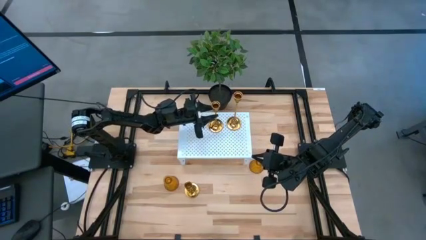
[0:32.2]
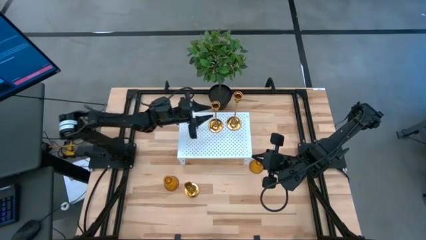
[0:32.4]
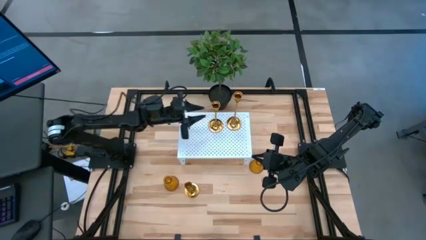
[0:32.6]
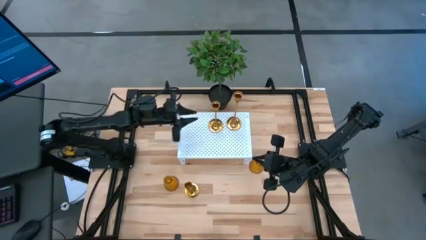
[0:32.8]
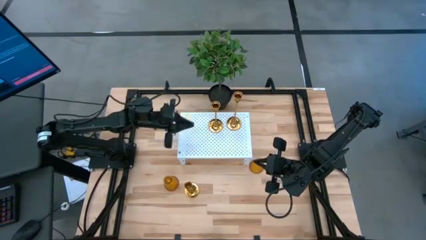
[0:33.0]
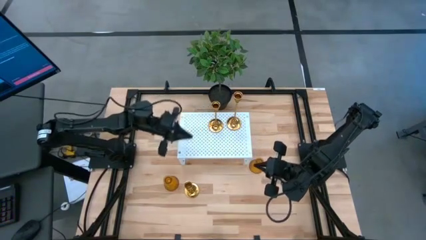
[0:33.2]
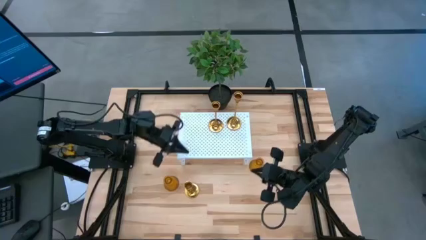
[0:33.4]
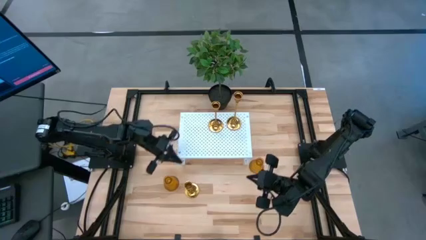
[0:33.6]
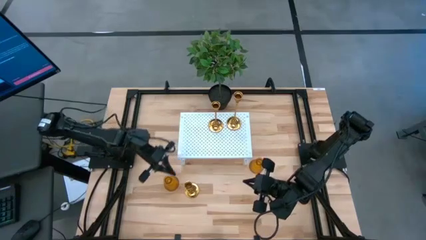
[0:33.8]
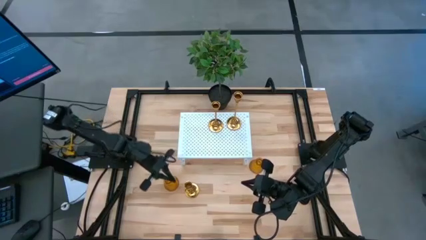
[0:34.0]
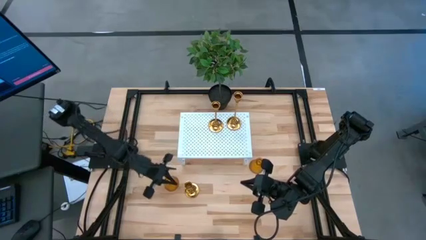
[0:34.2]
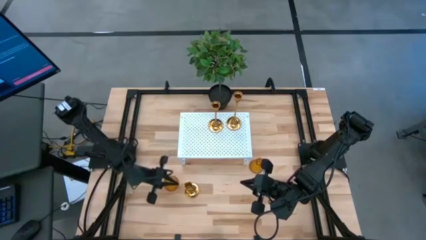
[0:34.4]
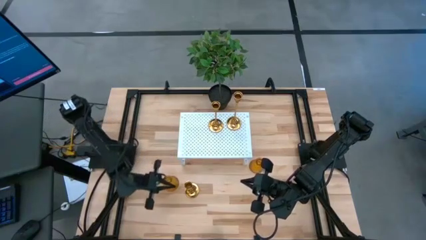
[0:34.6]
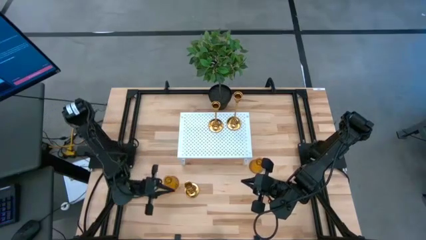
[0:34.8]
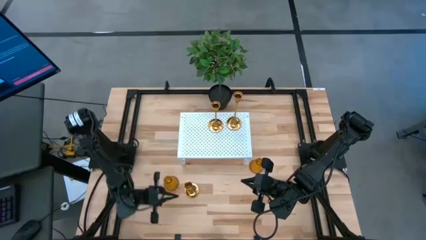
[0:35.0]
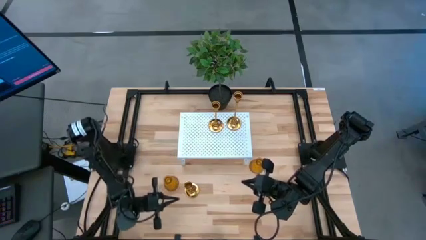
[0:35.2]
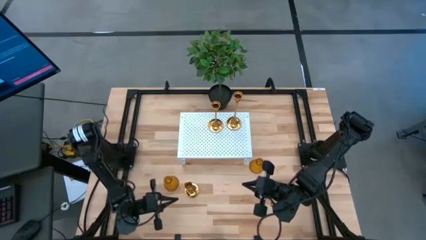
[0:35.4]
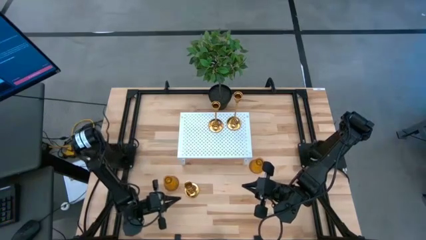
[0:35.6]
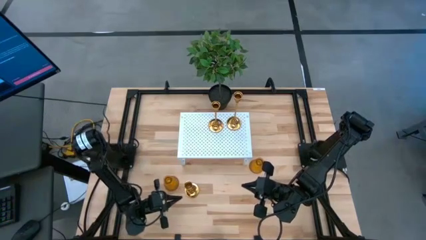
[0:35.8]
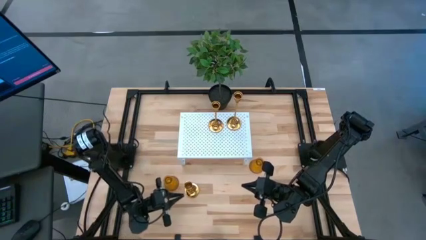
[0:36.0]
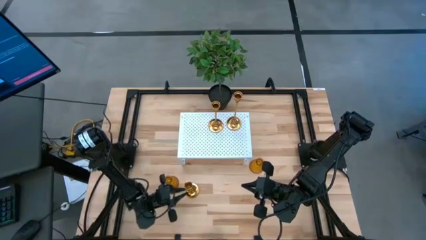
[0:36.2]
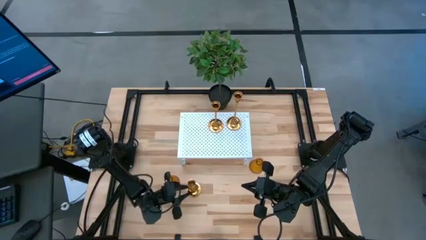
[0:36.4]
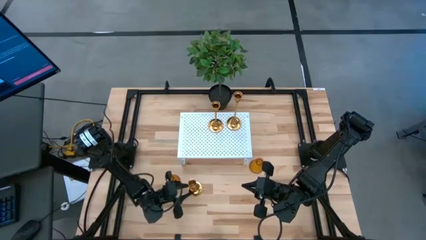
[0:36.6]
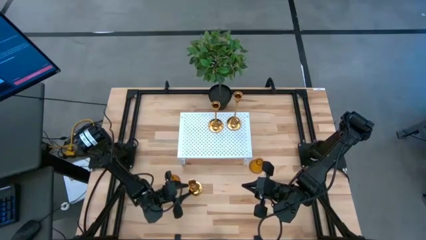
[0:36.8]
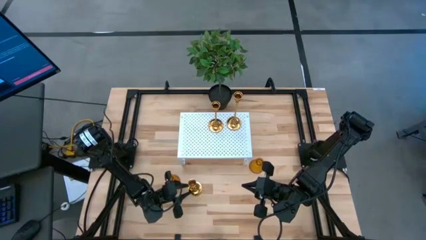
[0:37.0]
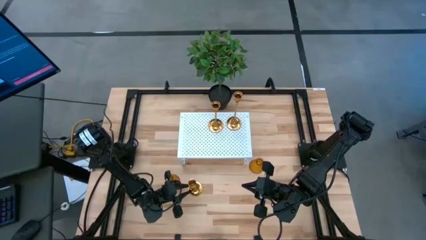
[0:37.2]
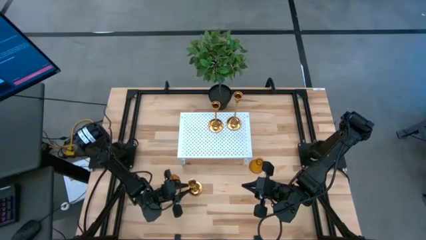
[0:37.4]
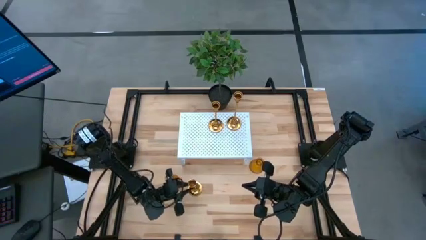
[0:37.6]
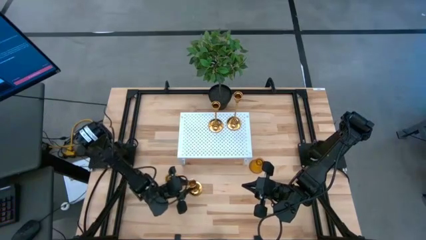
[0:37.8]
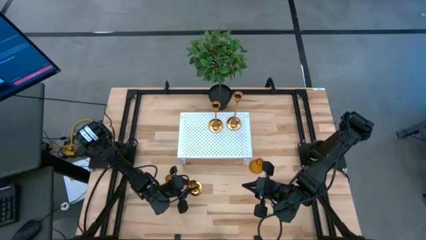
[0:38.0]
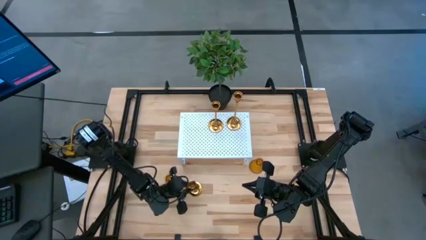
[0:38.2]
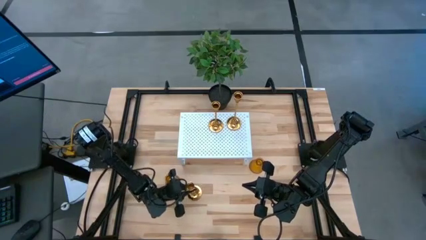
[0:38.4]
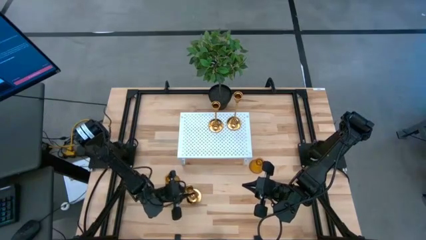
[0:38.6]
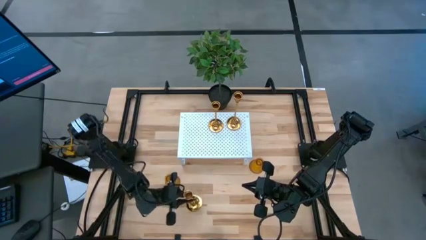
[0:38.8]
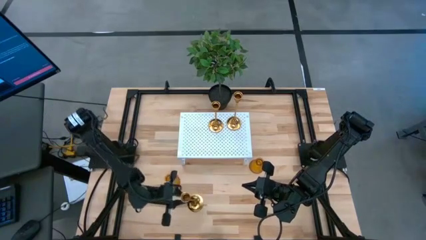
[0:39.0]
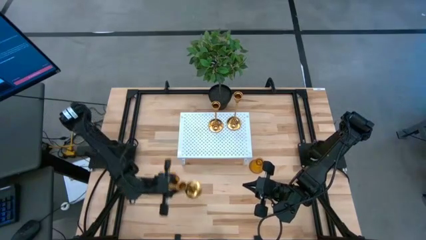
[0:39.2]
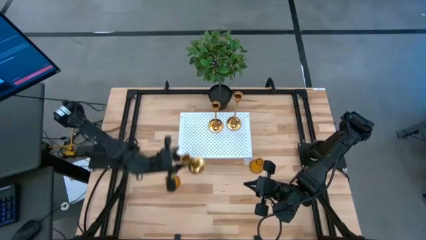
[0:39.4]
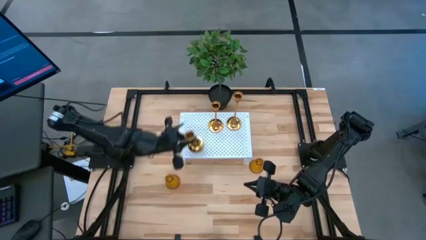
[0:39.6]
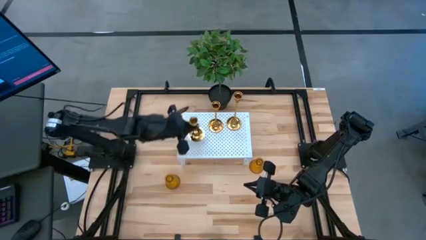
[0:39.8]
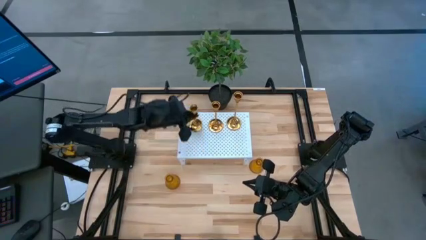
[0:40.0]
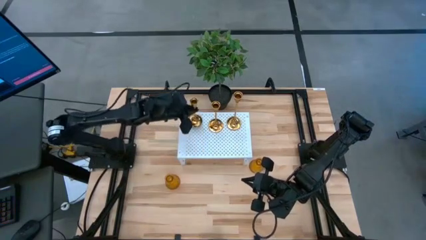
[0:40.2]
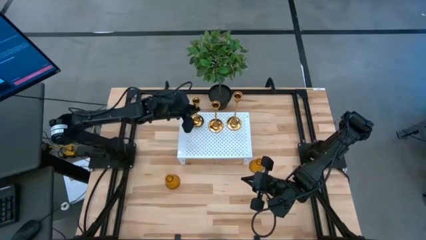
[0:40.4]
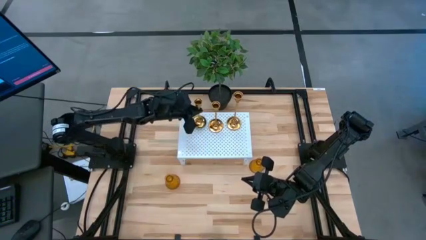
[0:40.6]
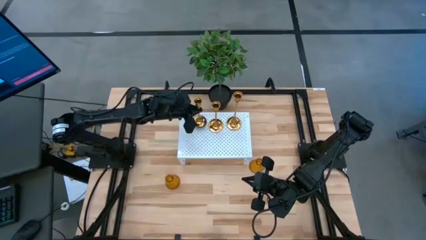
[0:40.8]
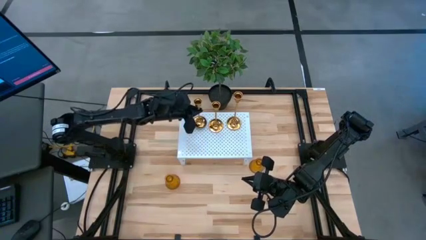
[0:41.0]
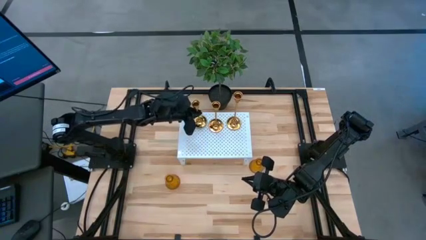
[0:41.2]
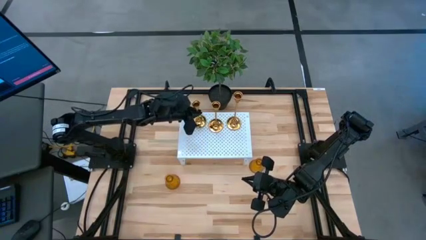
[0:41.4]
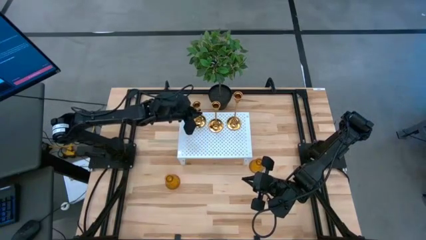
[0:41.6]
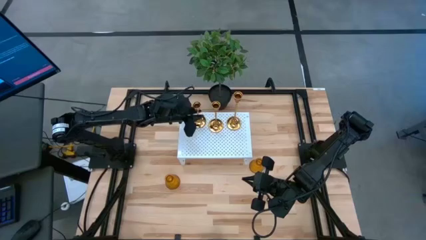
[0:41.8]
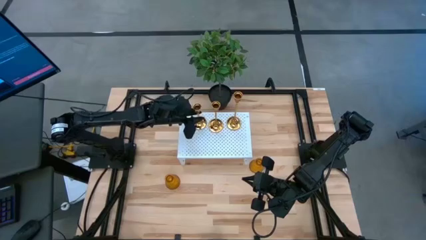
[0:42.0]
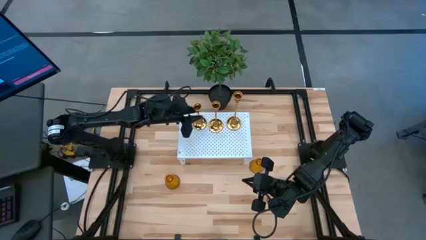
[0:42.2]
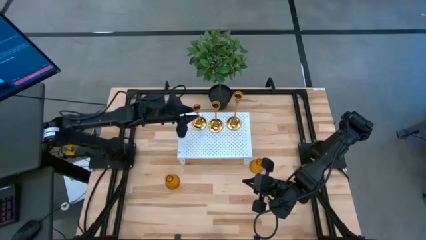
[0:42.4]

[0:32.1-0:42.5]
Task: Pick & Place candle stick holders
Put the gold candle holder on the shelf

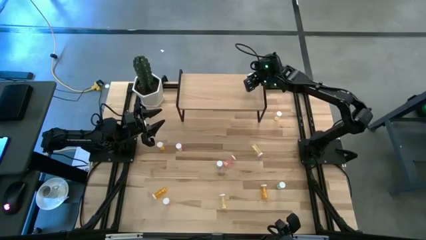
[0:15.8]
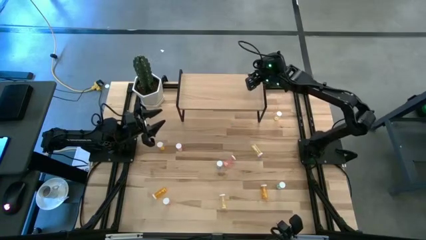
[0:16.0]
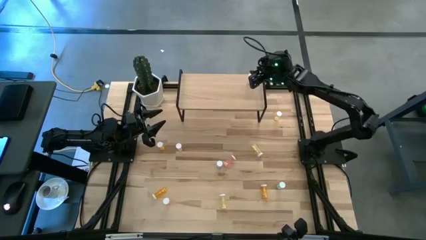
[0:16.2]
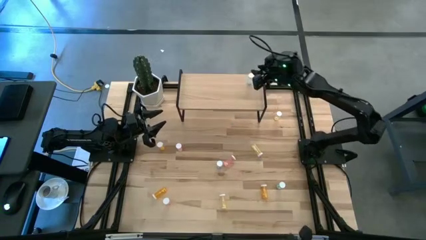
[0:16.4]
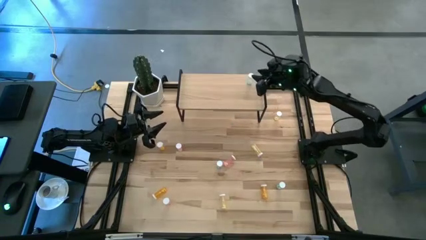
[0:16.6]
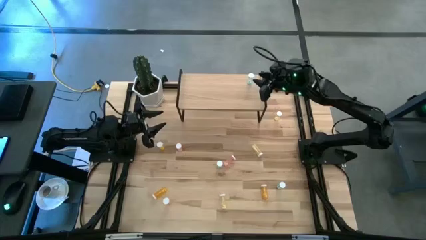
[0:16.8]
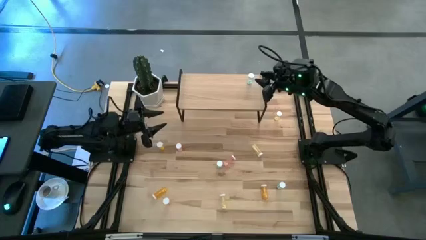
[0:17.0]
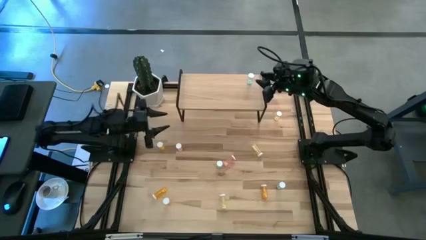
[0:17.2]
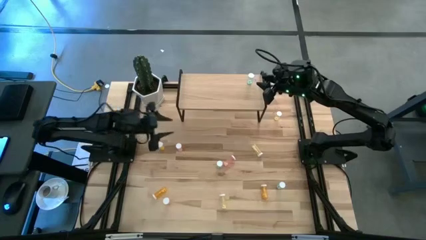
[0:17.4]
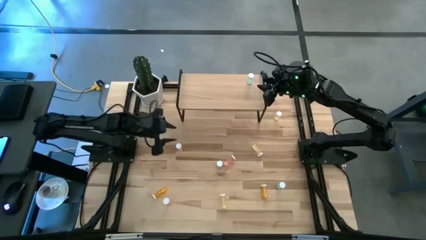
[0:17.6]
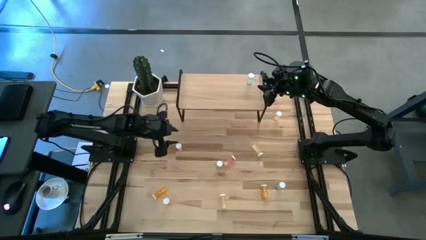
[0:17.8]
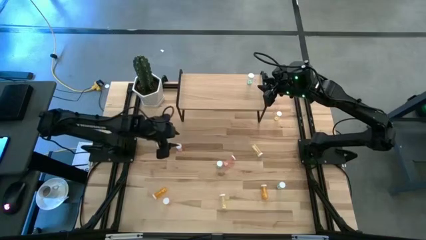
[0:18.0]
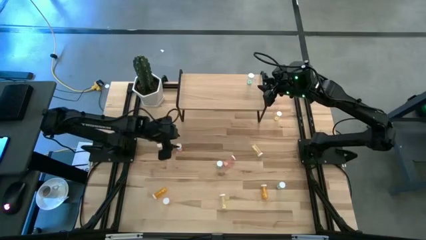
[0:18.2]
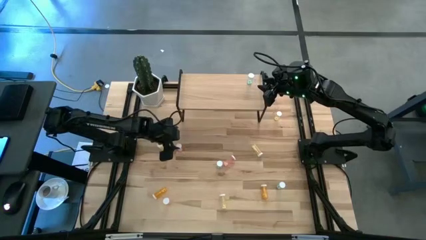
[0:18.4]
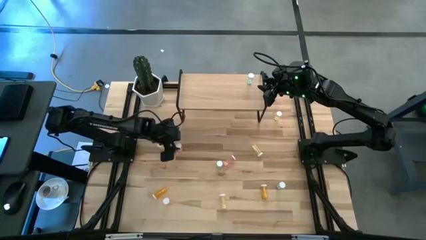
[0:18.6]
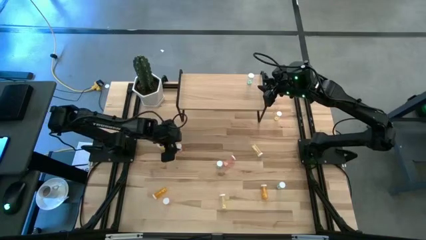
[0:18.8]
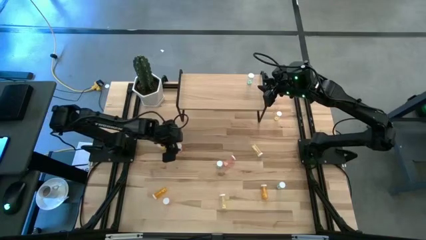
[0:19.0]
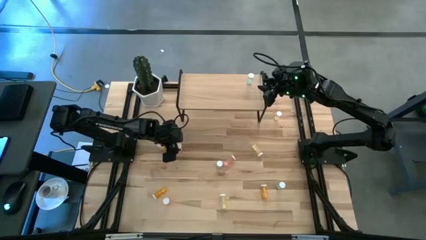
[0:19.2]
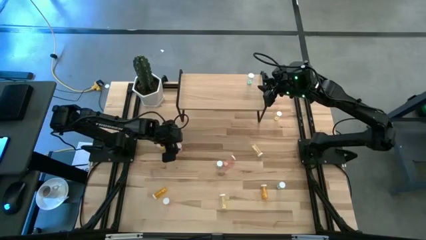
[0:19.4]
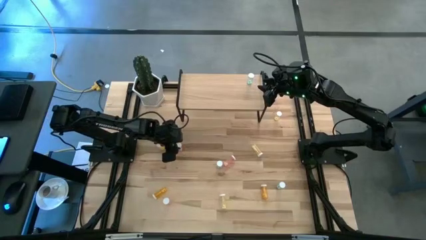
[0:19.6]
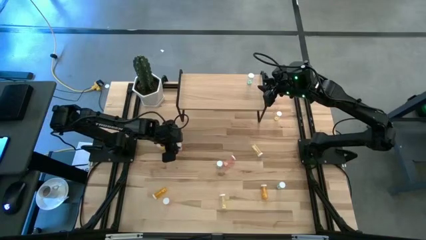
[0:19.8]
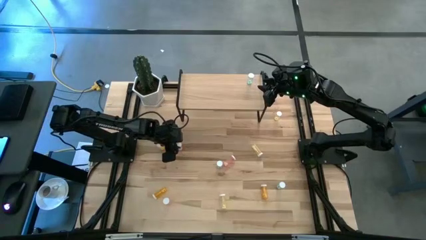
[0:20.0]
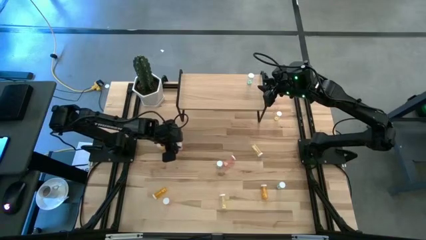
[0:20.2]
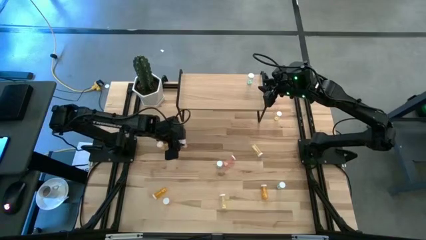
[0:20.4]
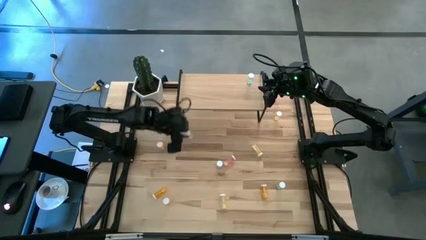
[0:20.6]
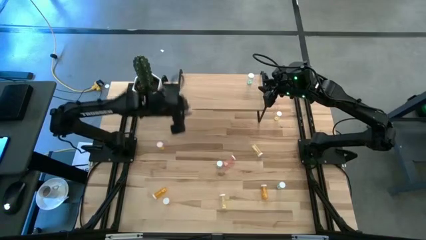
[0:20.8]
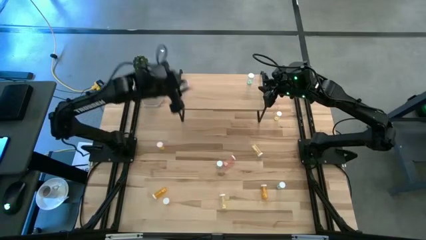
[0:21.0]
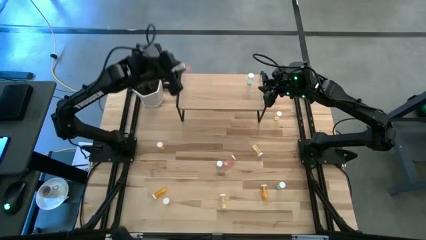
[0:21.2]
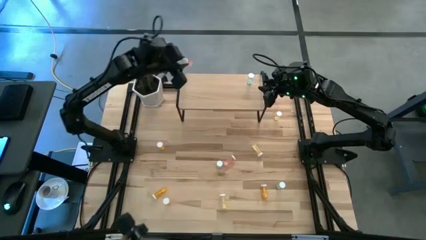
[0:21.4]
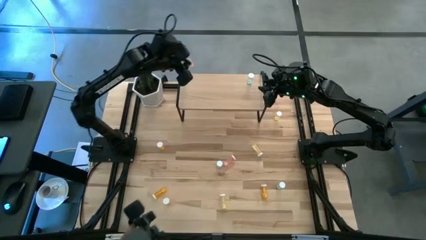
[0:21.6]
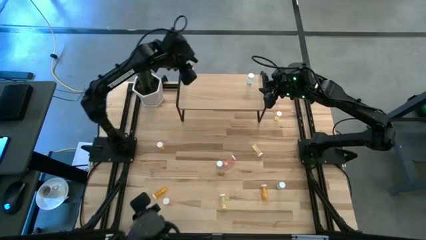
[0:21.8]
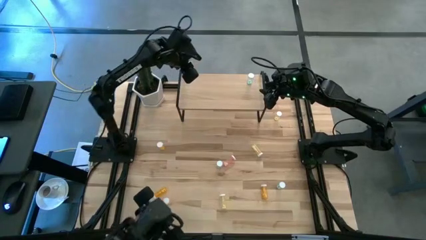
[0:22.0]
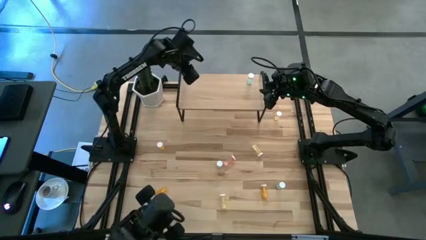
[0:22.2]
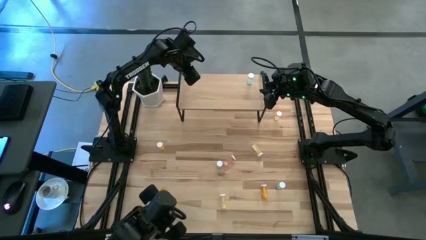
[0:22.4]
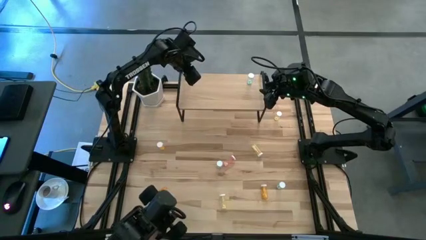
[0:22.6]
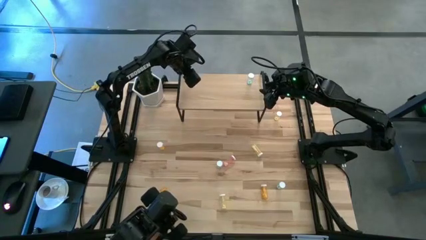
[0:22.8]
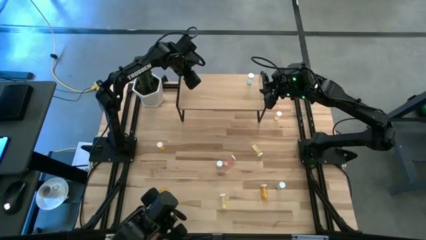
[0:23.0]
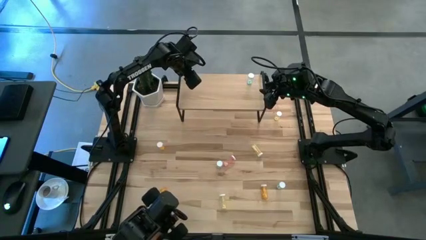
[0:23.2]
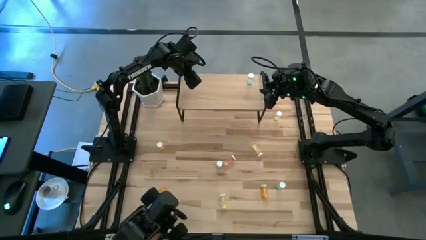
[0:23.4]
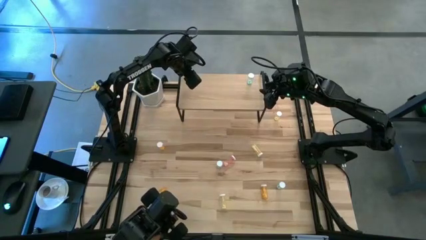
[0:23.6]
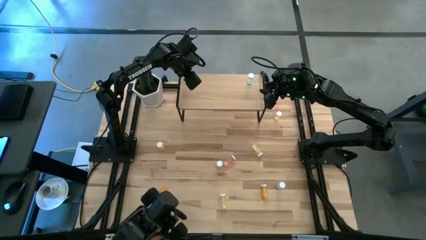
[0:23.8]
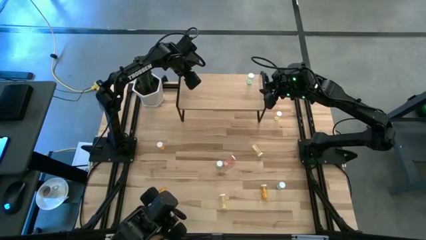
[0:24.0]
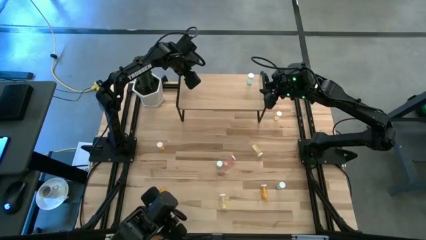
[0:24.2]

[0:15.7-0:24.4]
Task: Pick and place medicine bottles onto shelf by color
Put the top pink pill bottle on the shelf
